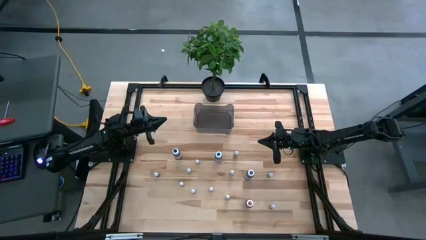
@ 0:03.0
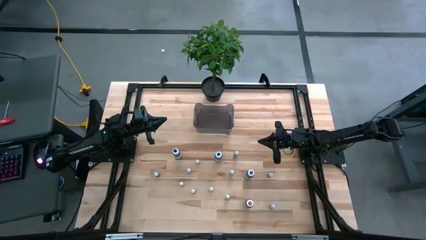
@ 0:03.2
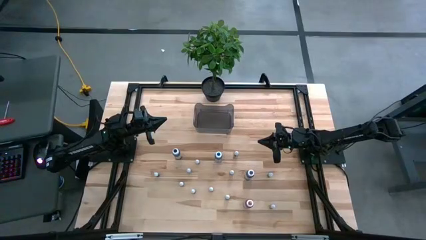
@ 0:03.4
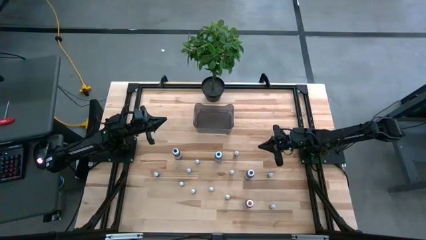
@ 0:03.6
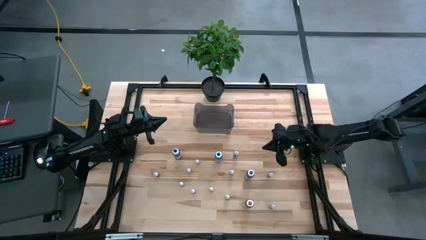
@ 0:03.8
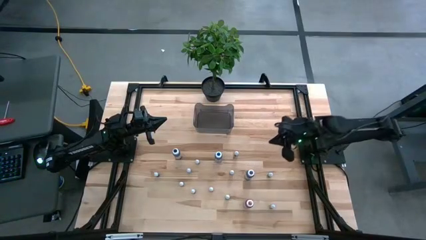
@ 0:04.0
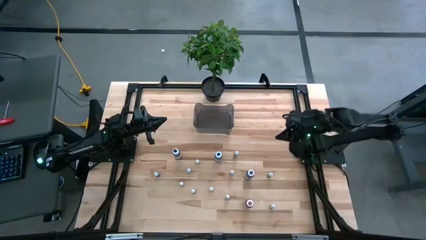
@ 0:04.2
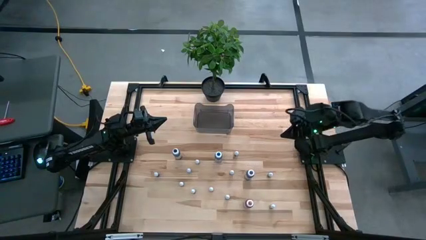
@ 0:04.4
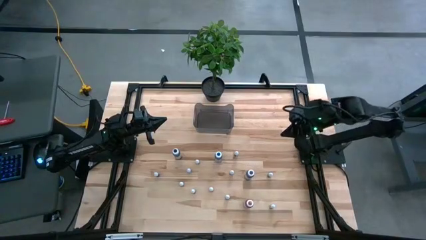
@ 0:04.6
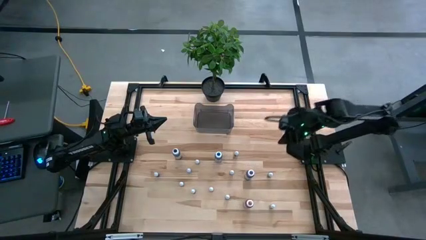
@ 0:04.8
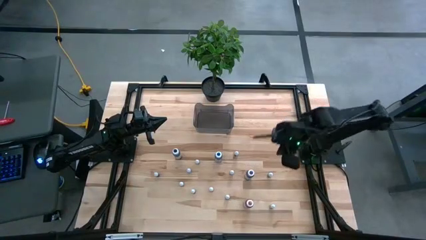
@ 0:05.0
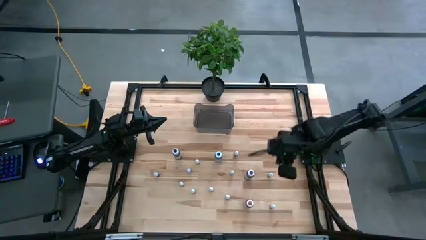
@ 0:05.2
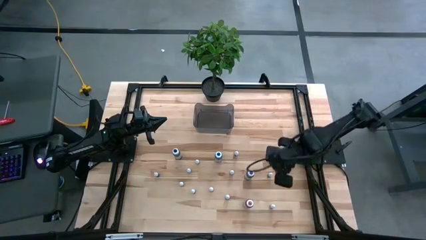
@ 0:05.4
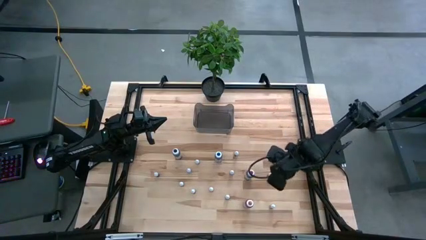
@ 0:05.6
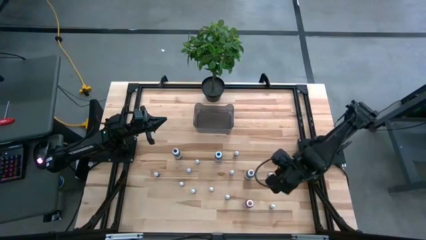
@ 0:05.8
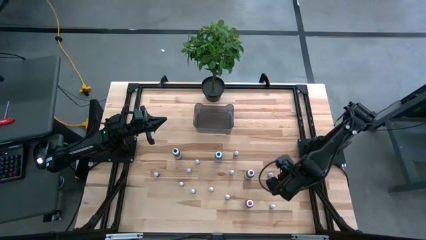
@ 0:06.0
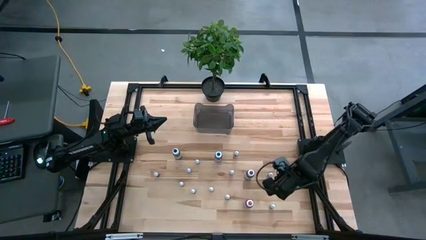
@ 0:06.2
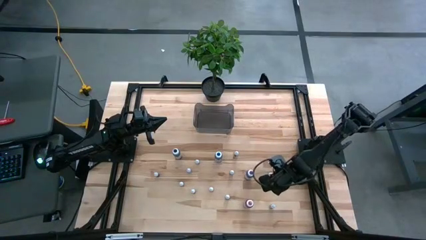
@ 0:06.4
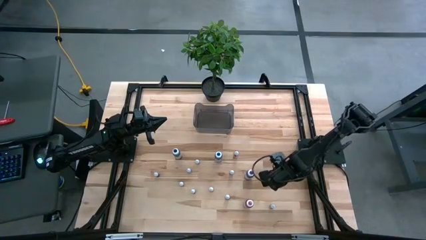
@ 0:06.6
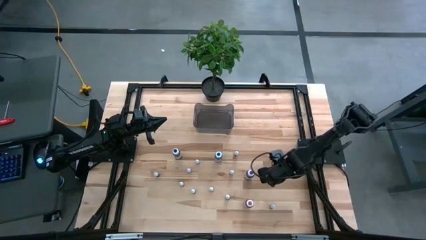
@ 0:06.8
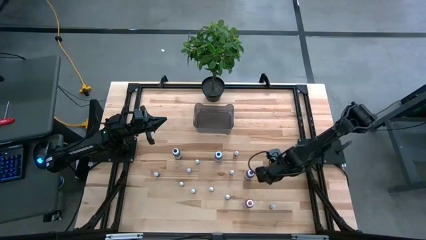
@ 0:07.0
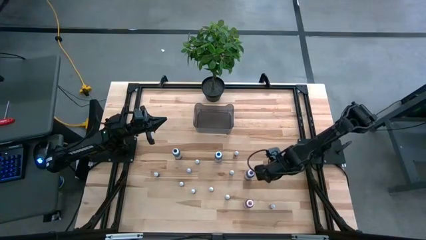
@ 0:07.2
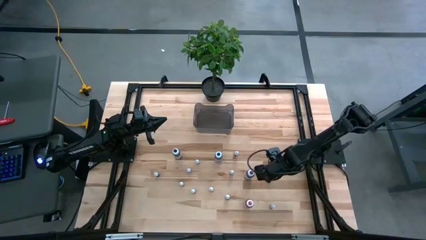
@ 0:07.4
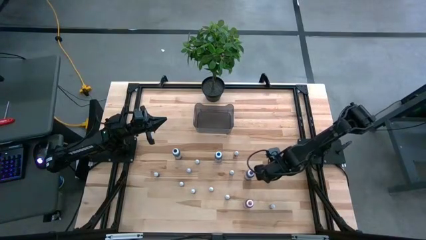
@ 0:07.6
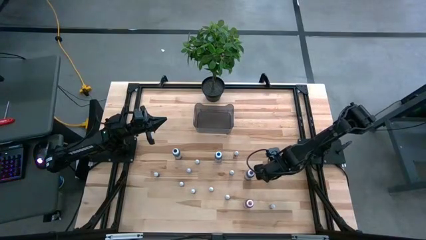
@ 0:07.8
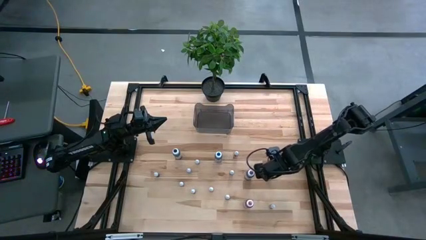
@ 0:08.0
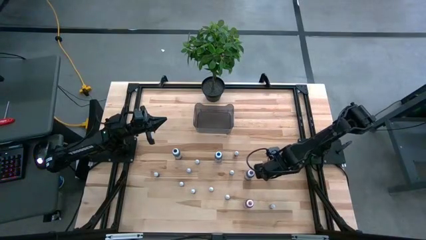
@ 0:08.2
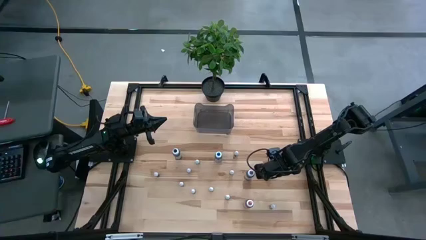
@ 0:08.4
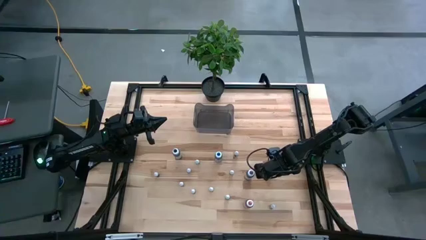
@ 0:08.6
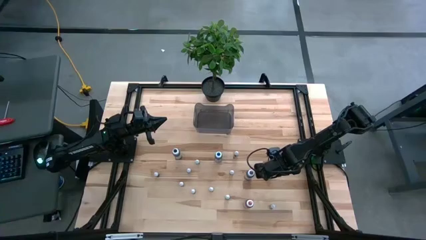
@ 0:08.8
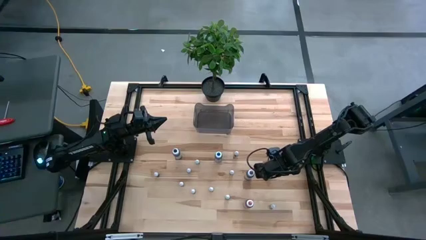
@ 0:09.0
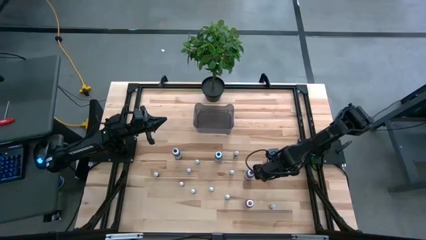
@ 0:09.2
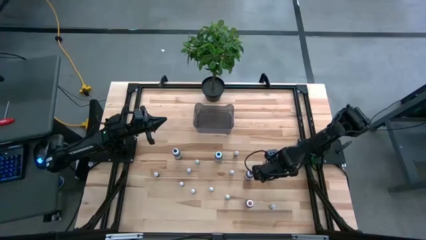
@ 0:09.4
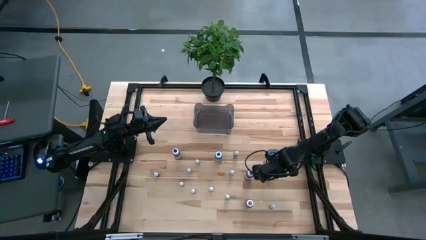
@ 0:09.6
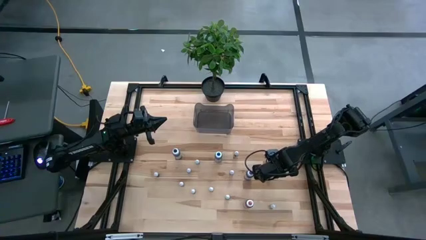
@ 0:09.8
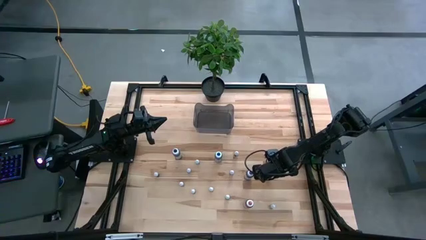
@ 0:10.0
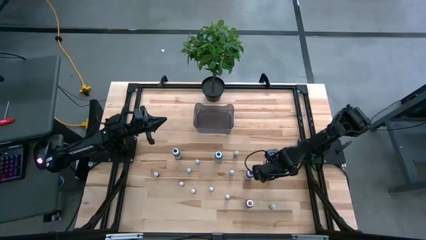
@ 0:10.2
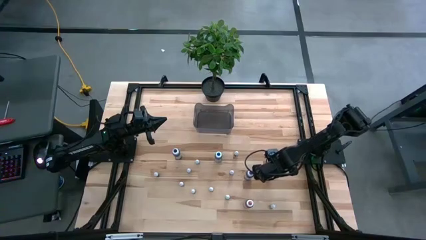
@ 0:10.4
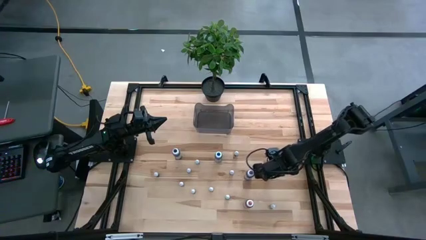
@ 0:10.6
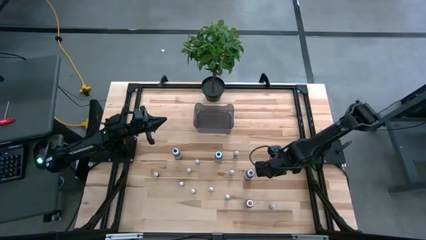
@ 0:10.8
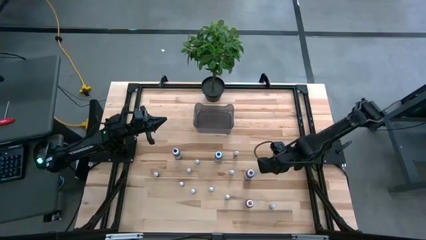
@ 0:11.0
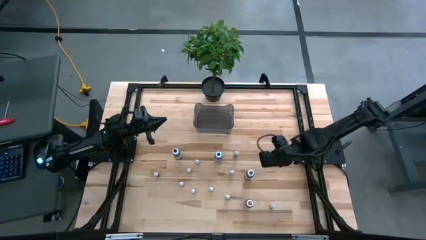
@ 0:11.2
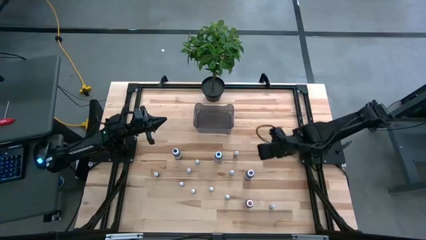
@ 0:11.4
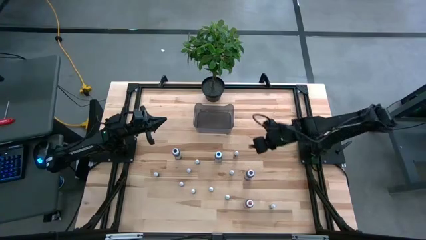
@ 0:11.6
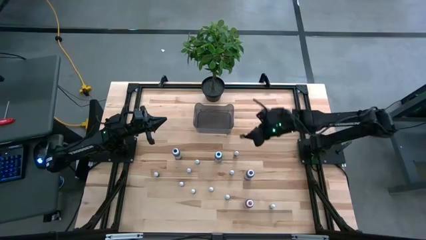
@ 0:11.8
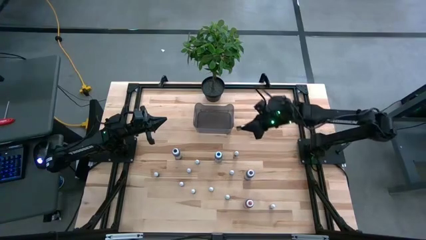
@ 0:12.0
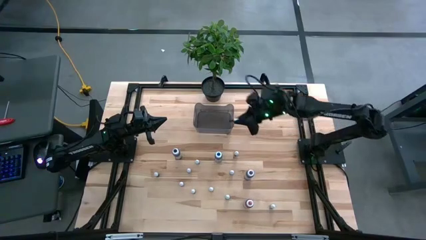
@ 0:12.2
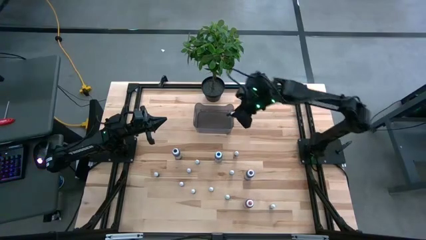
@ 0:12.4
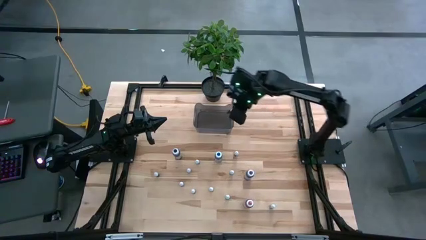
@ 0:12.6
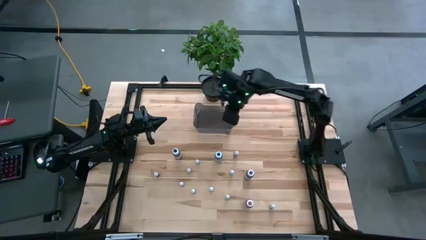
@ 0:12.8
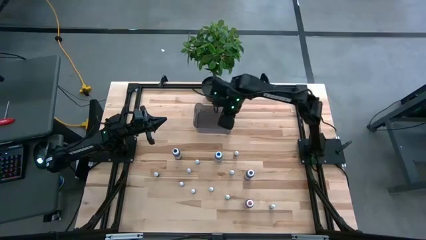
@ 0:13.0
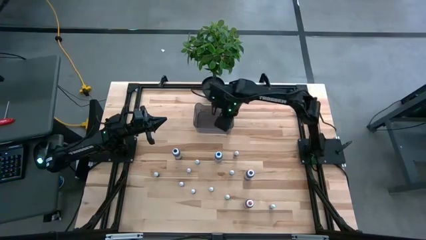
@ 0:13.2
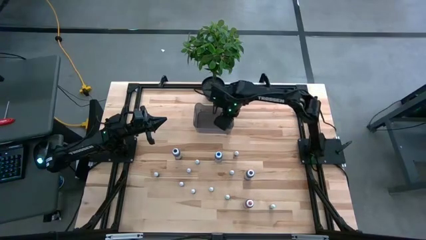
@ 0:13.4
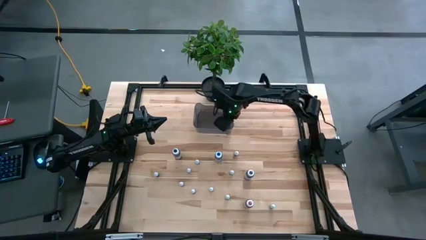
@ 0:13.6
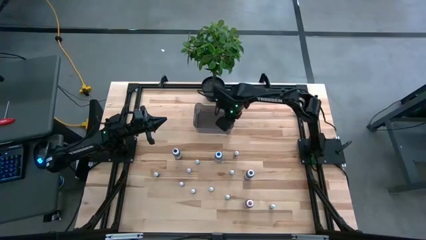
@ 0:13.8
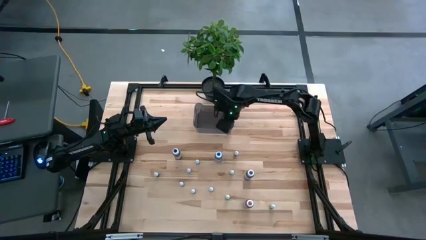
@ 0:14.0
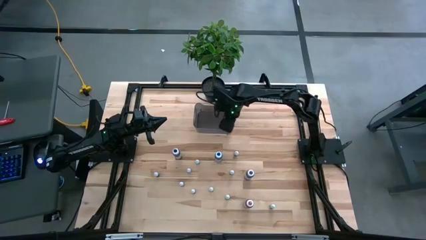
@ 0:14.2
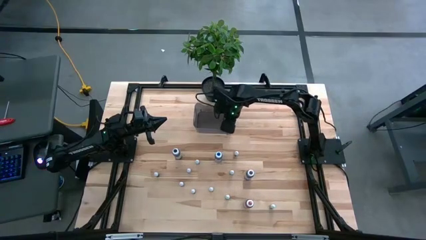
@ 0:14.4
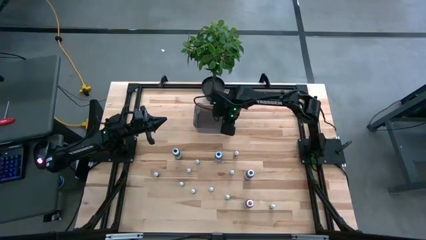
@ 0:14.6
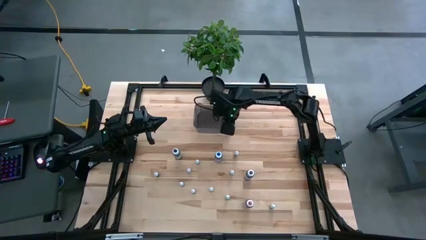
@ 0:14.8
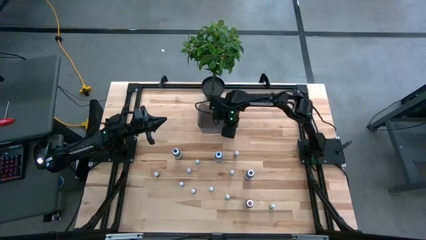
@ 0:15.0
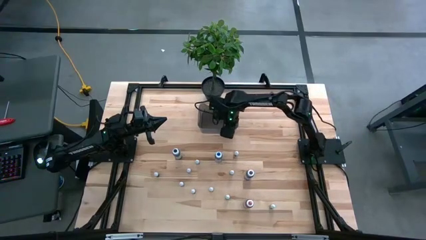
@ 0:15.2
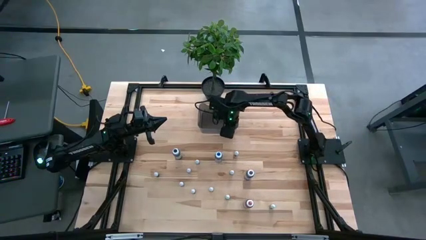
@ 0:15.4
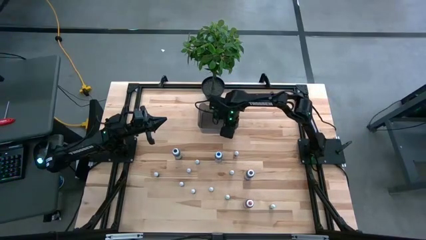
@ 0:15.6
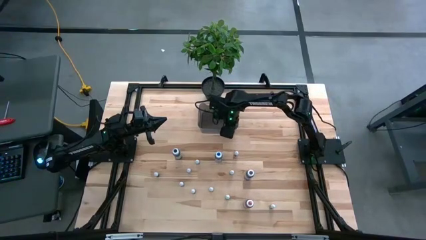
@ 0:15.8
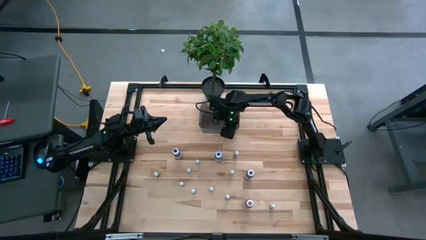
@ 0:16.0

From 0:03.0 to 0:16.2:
Task: Pick & Place food coloring
Put the small green food coloring bottle into the black bin

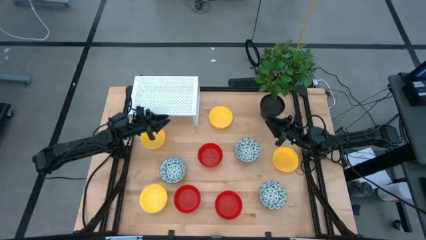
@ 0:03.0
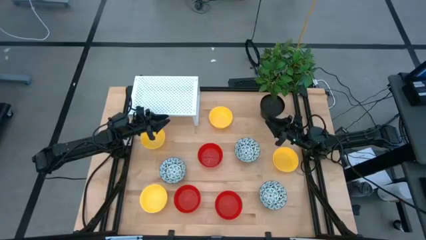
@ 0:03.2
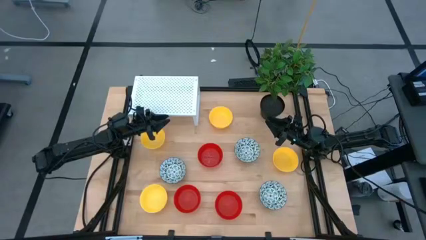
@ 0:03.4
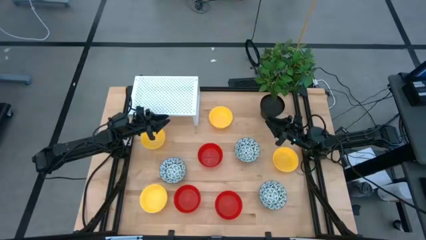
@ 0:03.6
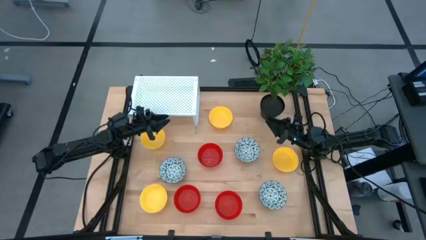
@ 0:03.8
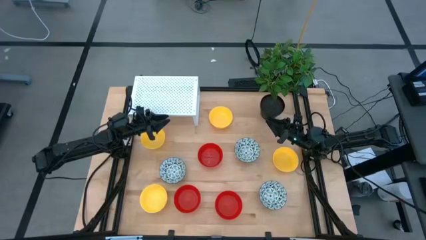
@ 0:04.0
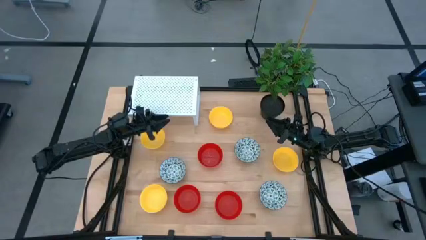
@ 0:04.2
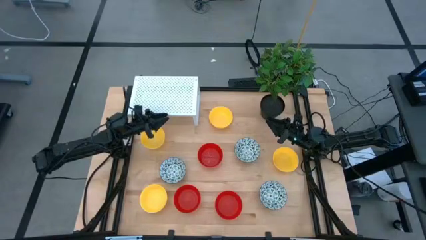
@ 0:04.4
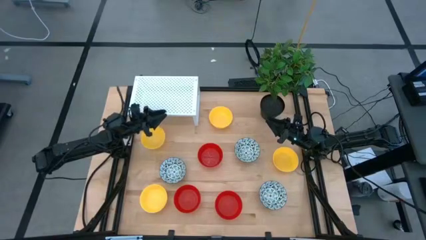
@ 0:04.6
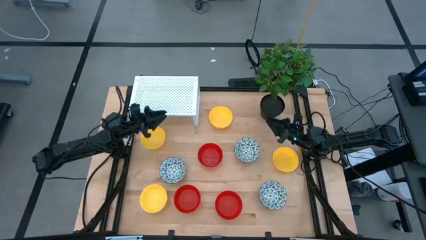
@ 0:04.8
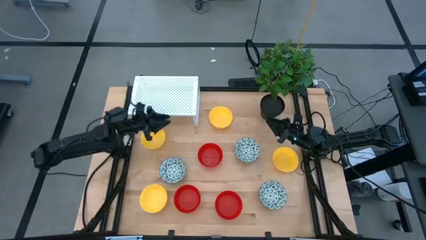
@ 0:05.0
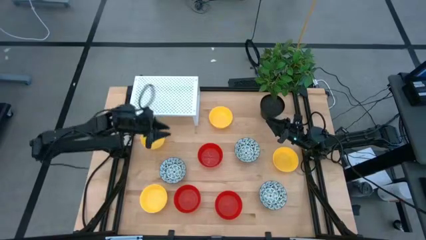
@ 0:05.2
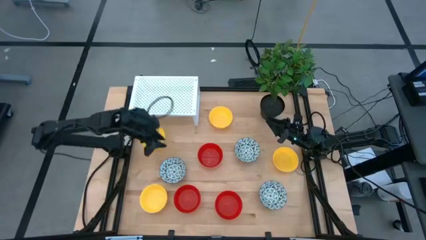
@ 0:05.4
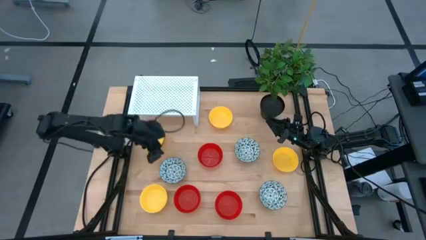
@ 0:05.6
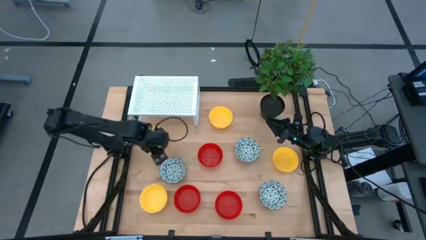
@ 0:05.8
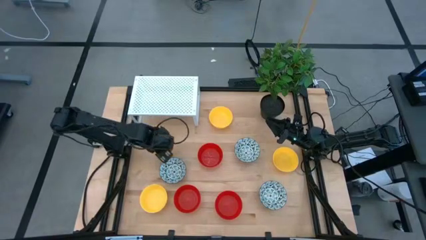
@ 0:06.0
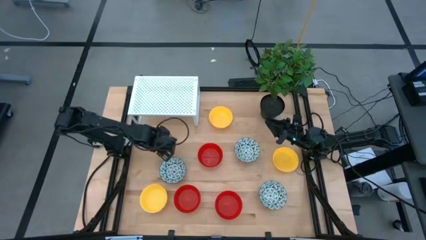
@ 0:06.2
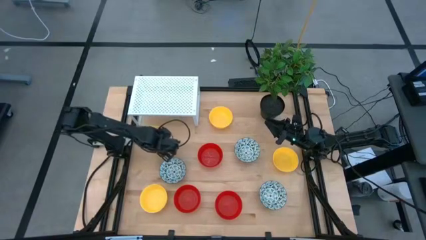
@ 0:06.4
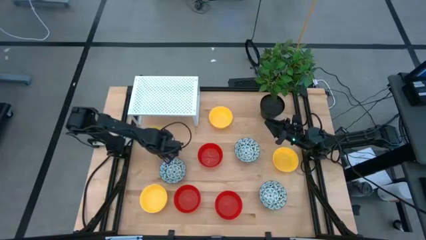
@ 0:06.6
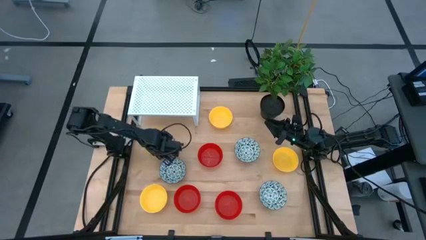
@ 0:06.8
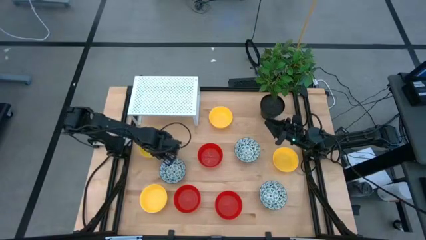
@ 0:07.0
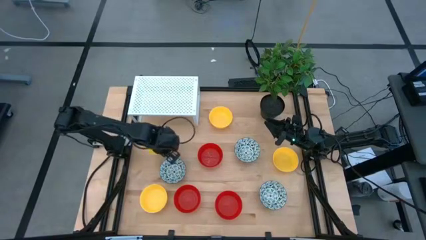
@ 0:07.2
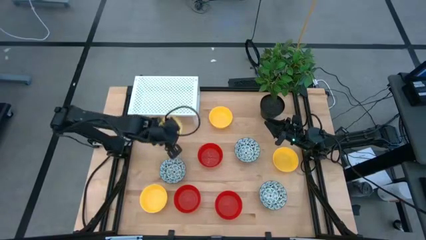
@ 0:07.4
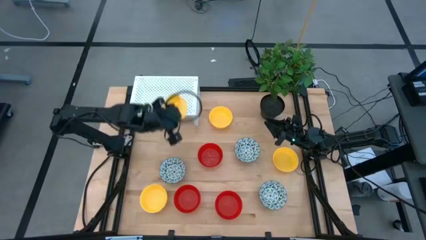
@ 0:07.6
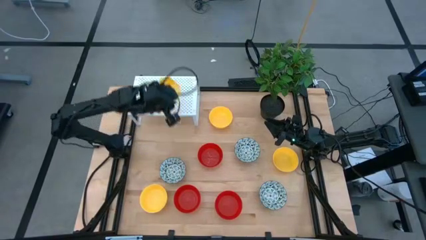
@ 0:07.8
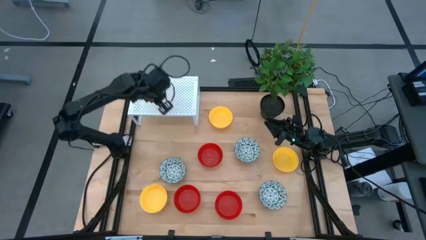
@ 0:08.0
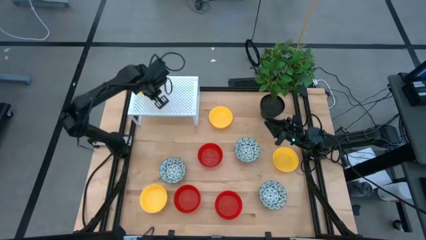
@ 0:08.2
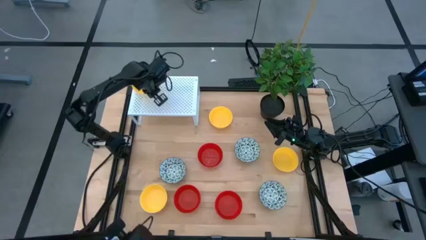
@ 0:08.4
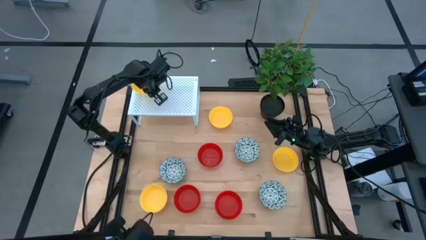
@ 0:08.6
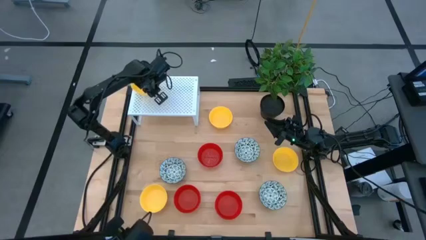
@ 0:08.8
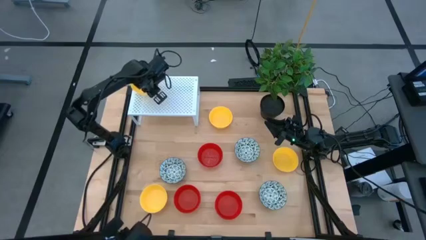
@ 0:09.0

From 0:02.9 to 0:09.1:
Task: Pick & Place Mini bowls
Put the yellow bowl on the shelf
